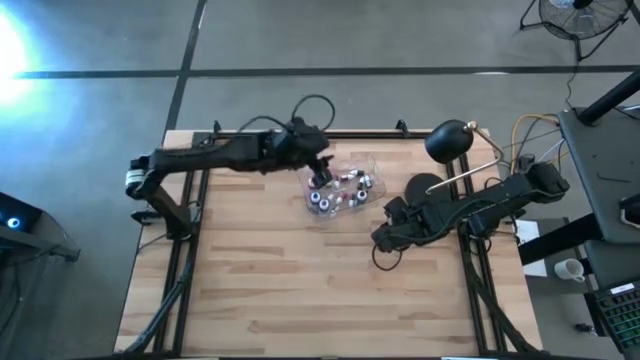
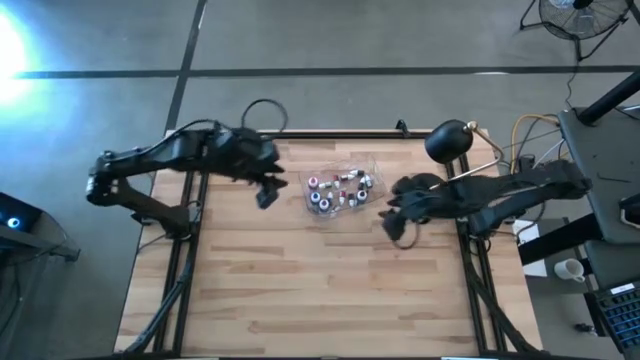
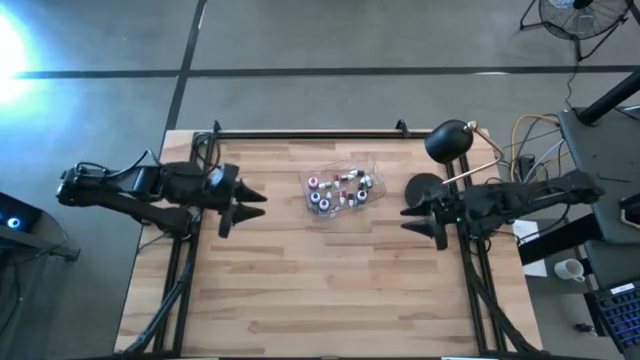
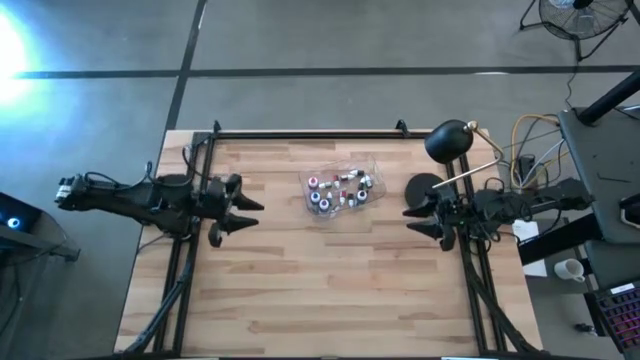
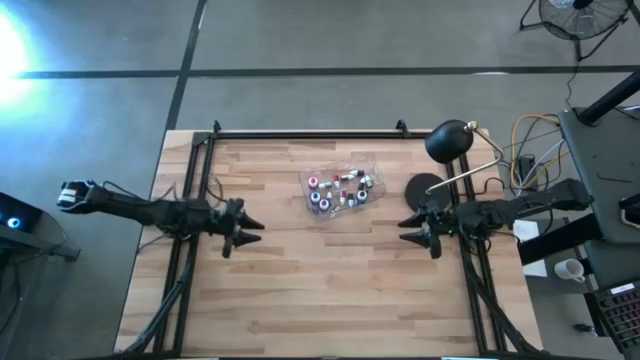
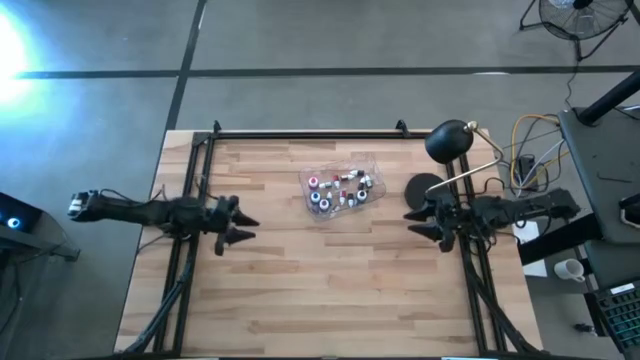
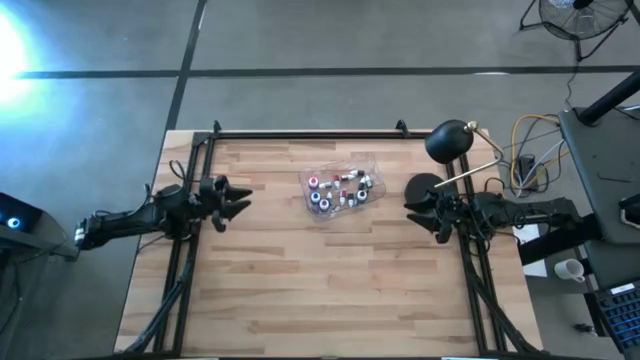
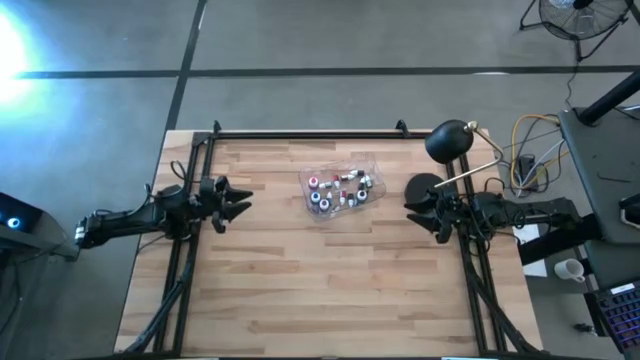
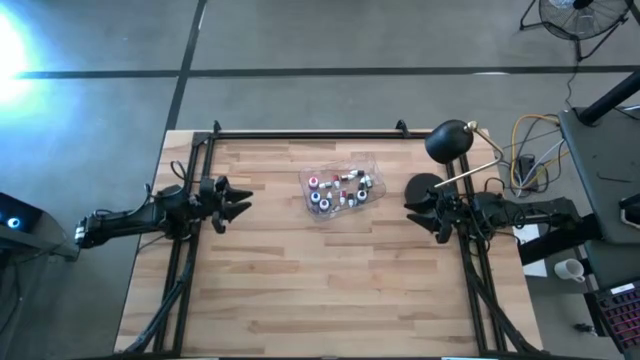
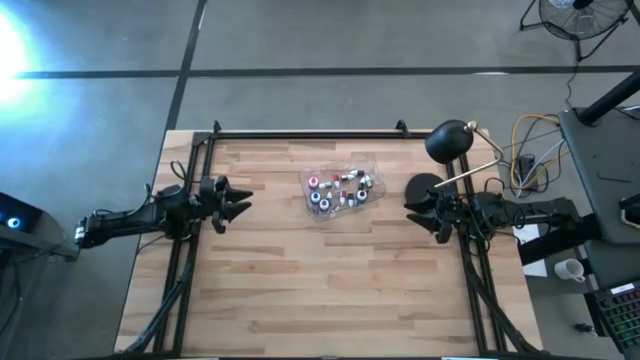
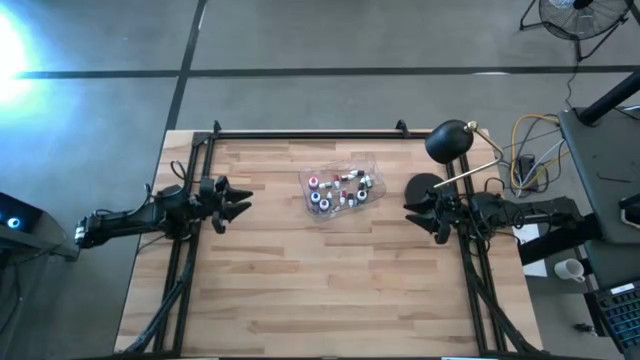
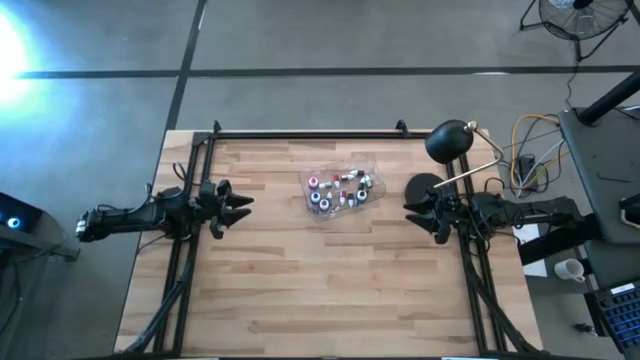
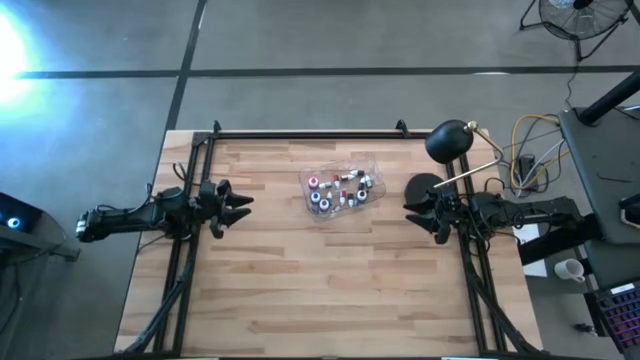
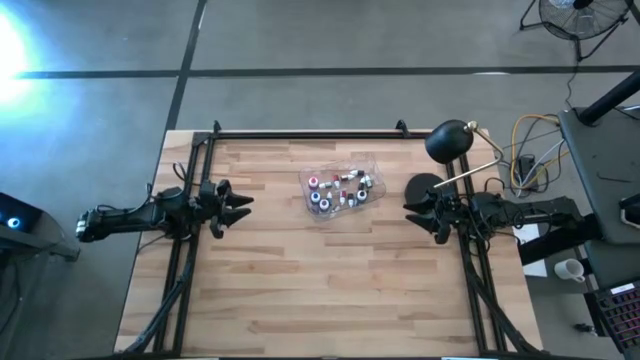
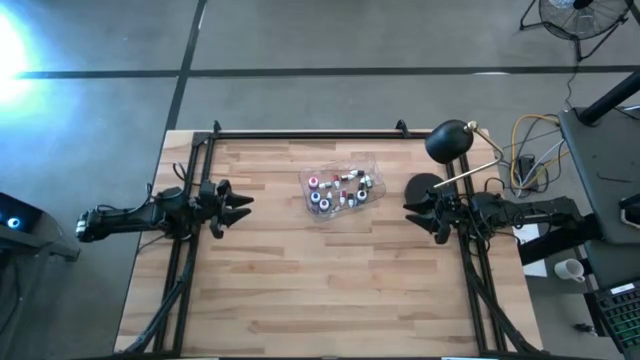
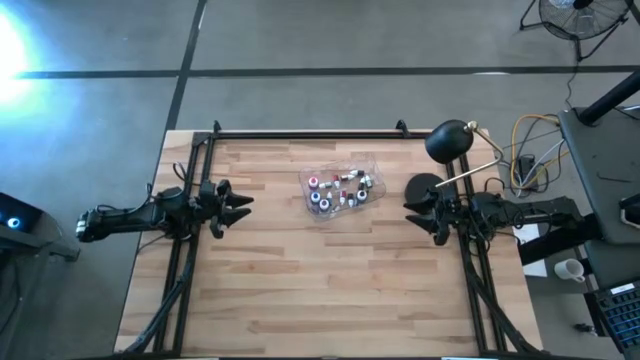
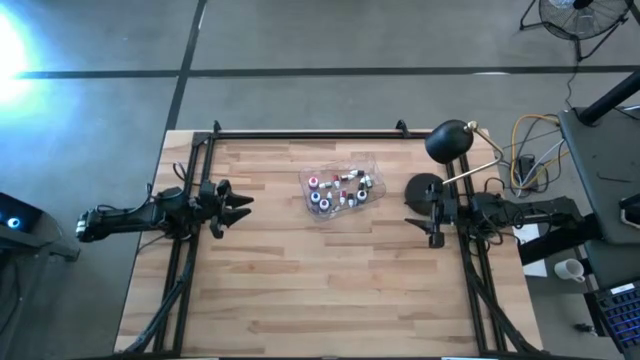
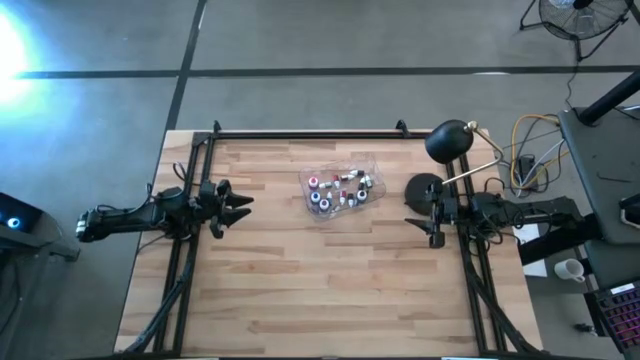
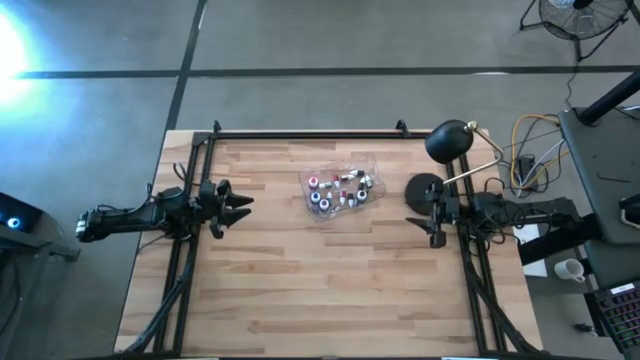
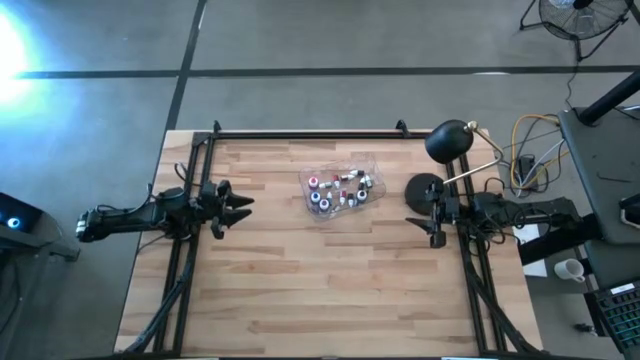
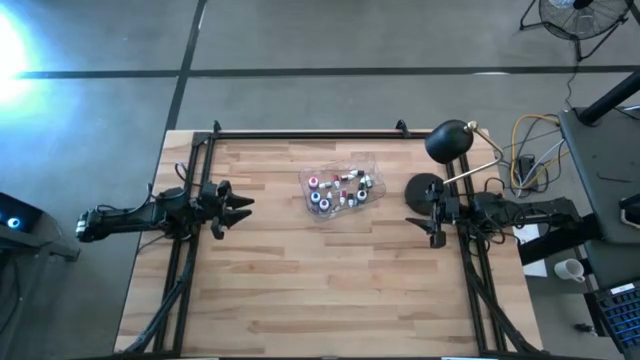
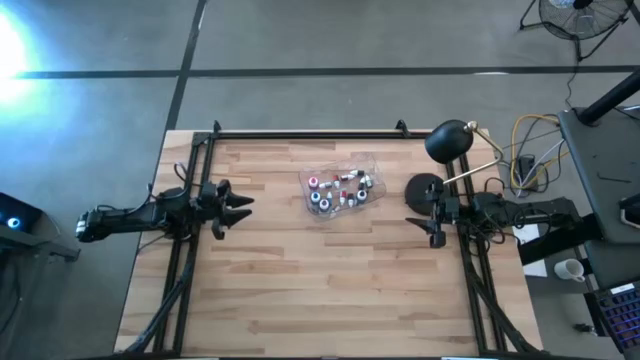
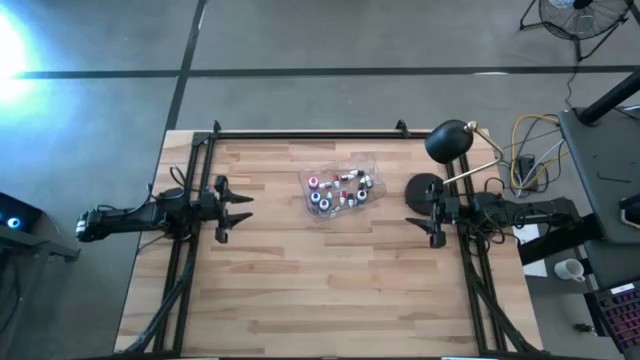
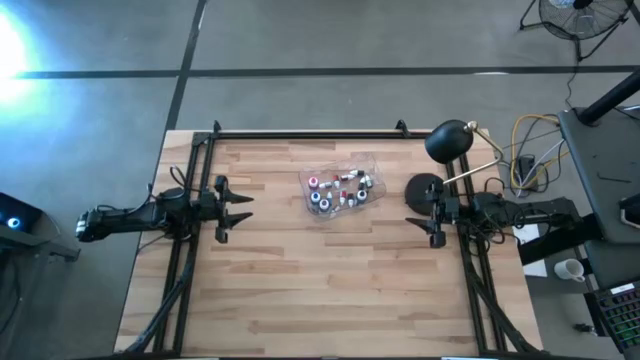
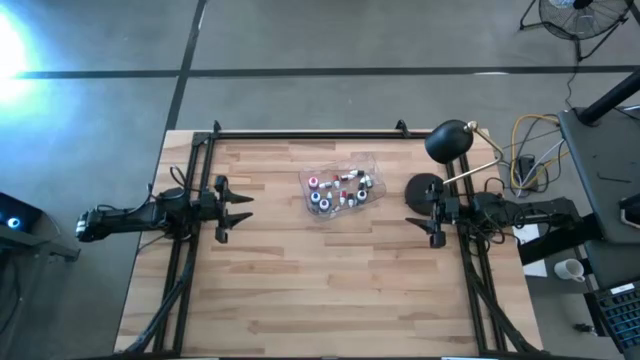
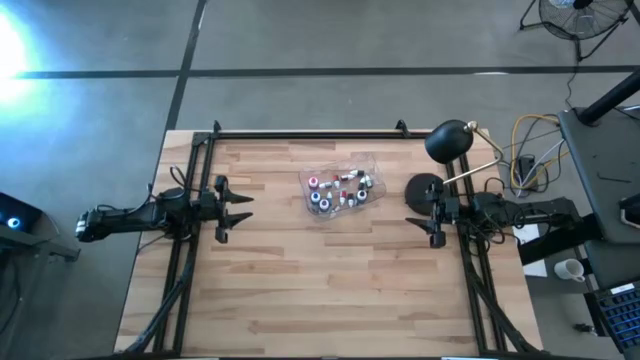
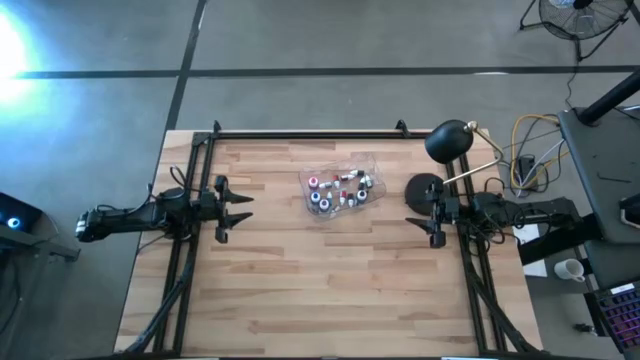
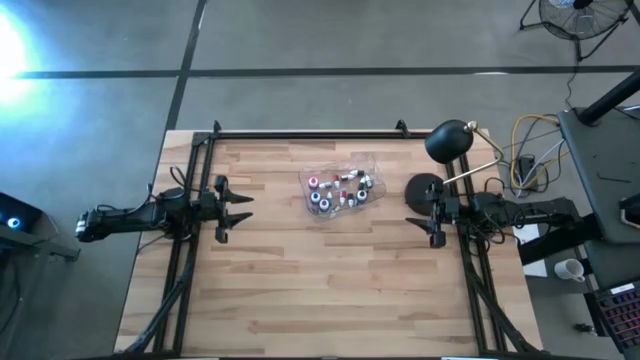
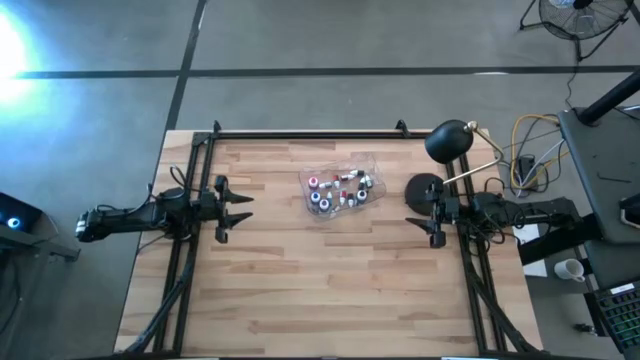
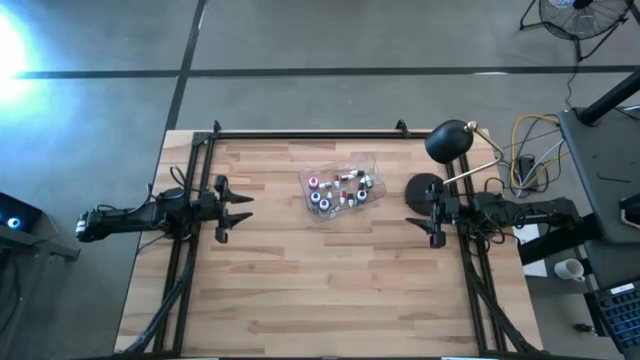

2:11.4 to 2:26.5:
Task: Pick & Place food coloring
Return to Home Position
